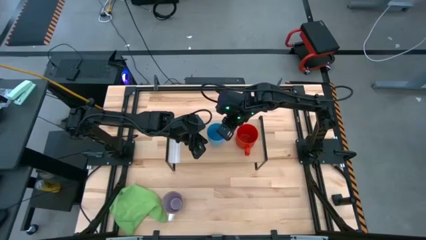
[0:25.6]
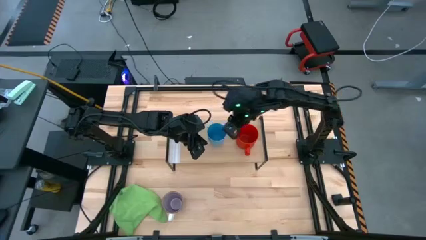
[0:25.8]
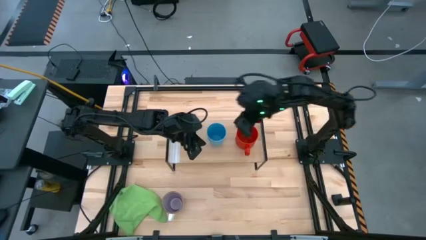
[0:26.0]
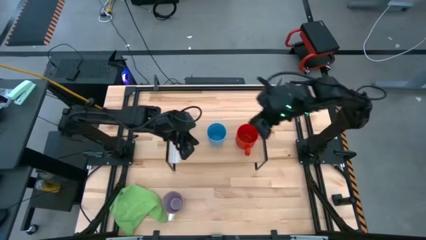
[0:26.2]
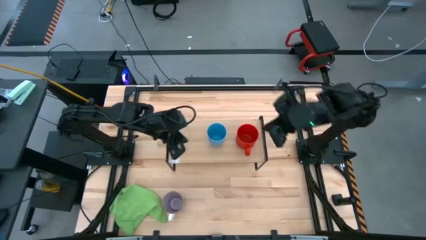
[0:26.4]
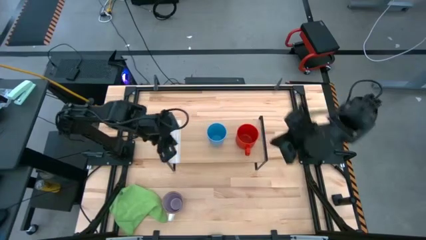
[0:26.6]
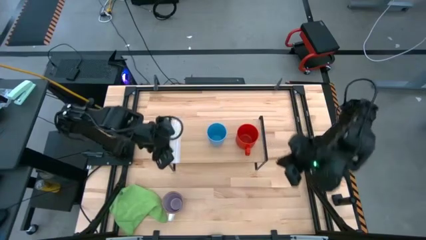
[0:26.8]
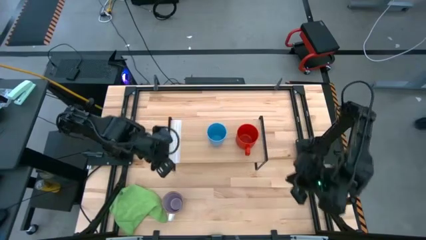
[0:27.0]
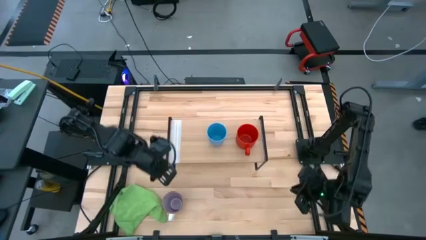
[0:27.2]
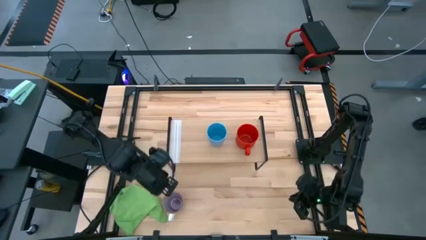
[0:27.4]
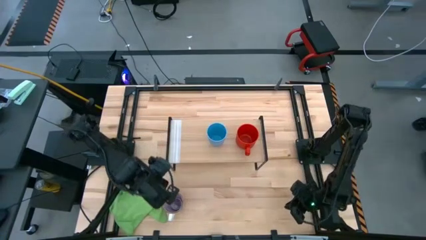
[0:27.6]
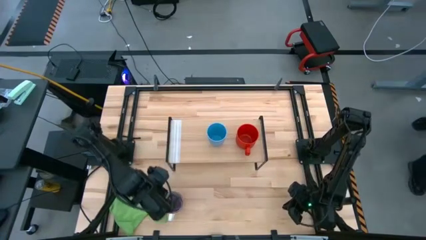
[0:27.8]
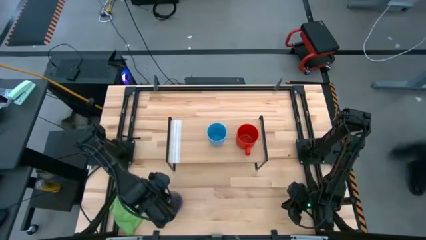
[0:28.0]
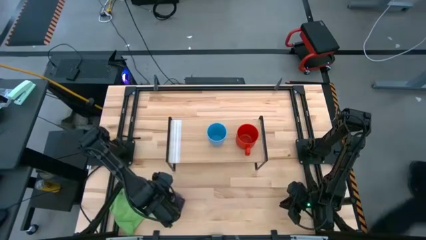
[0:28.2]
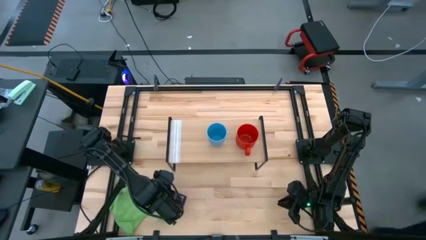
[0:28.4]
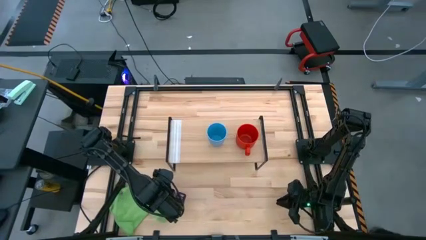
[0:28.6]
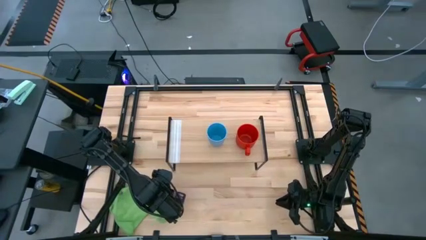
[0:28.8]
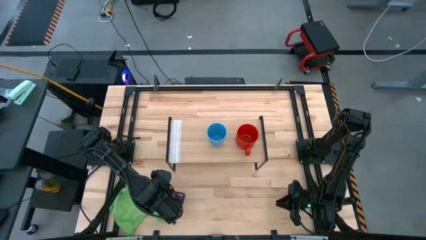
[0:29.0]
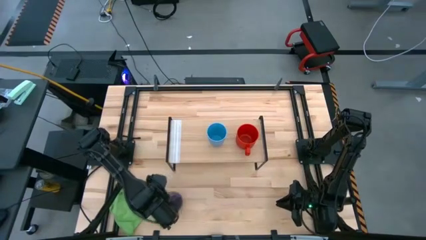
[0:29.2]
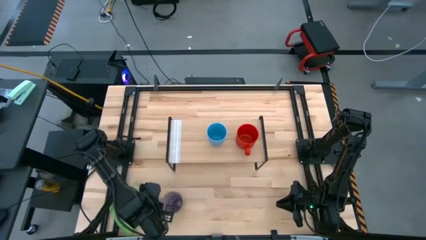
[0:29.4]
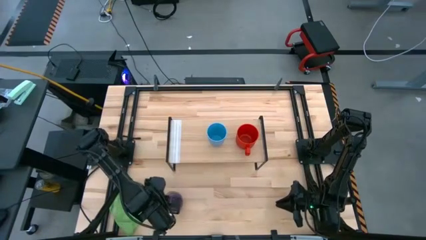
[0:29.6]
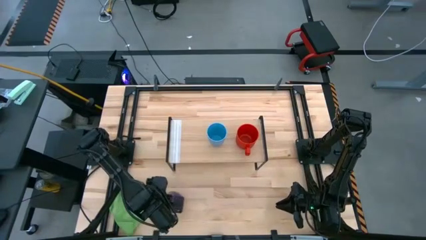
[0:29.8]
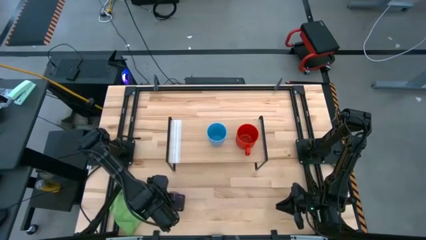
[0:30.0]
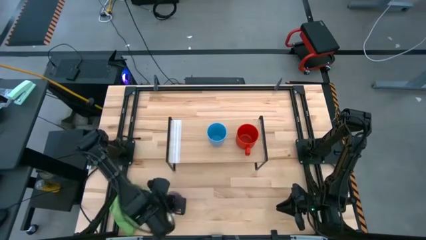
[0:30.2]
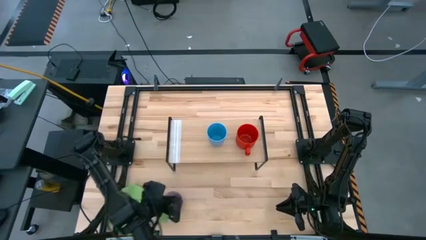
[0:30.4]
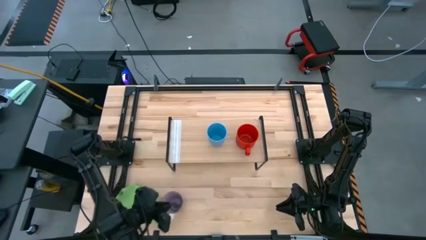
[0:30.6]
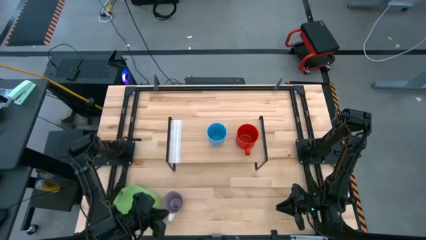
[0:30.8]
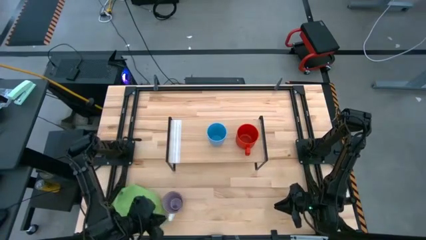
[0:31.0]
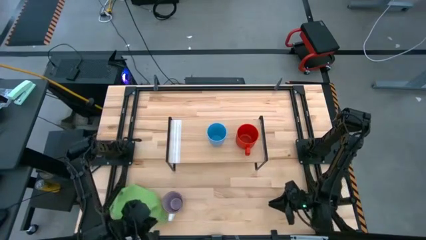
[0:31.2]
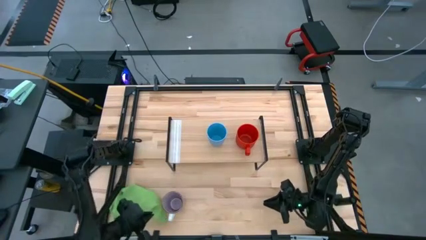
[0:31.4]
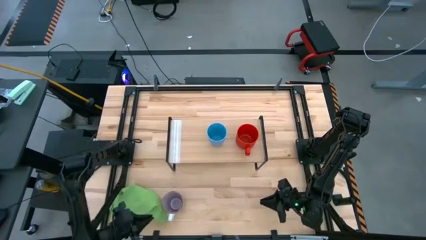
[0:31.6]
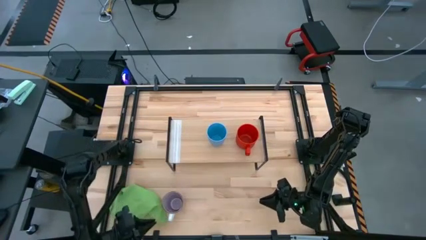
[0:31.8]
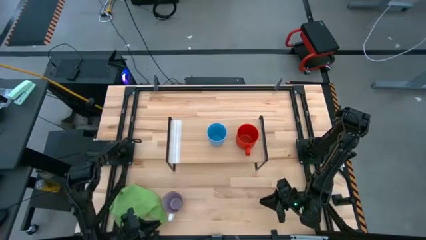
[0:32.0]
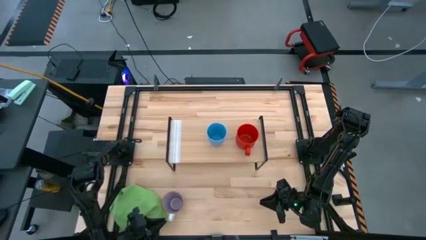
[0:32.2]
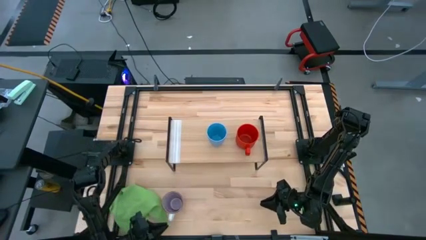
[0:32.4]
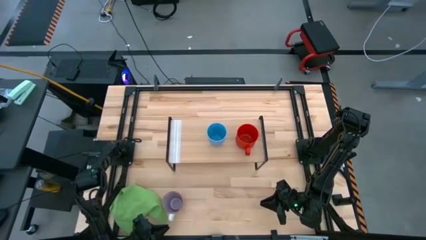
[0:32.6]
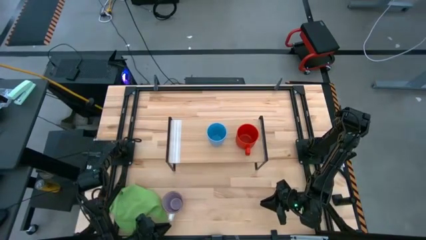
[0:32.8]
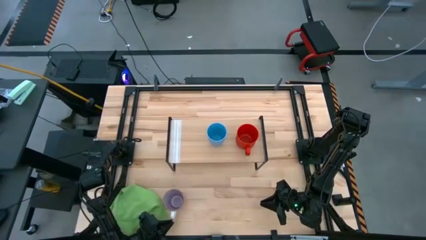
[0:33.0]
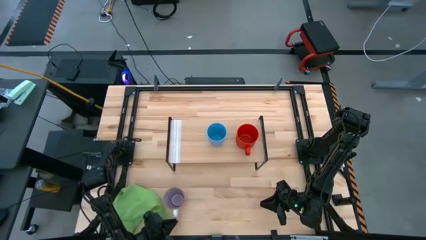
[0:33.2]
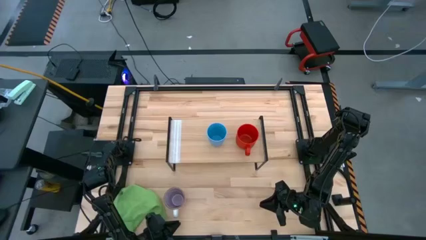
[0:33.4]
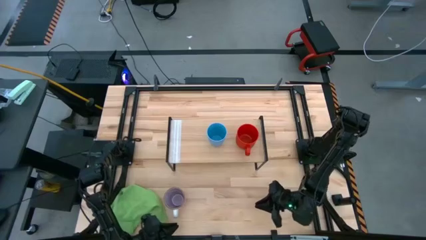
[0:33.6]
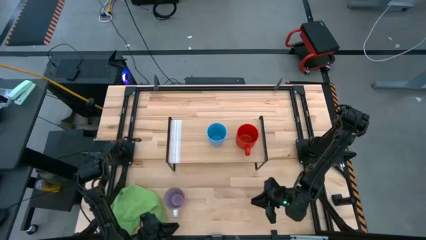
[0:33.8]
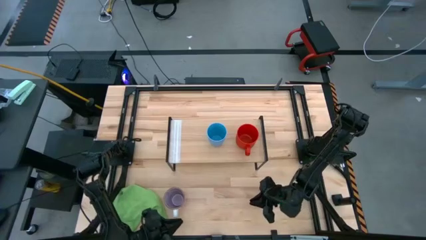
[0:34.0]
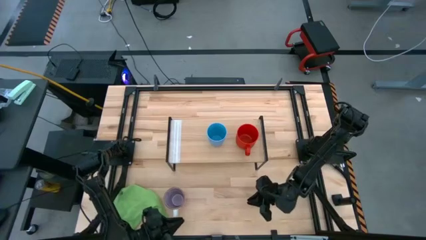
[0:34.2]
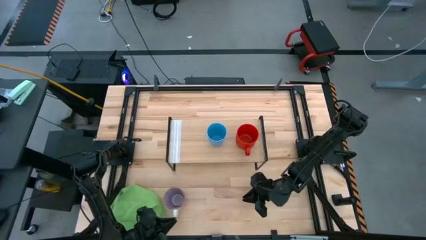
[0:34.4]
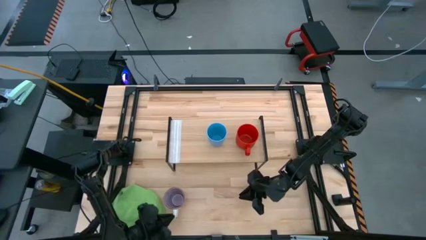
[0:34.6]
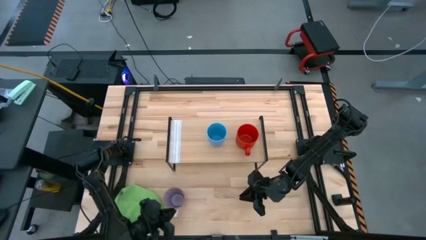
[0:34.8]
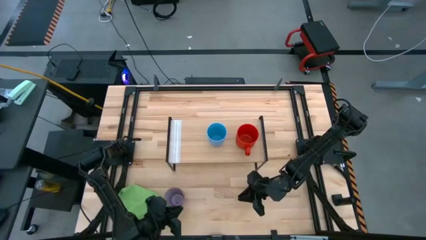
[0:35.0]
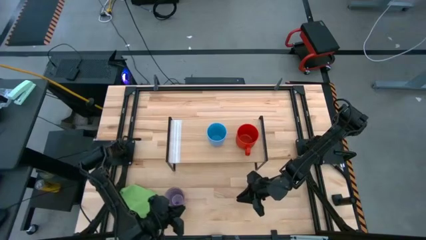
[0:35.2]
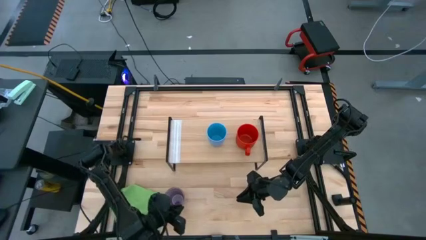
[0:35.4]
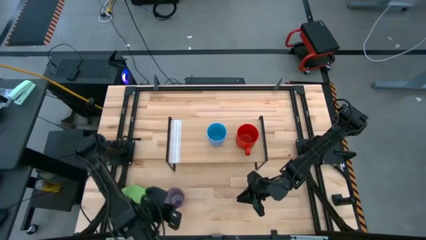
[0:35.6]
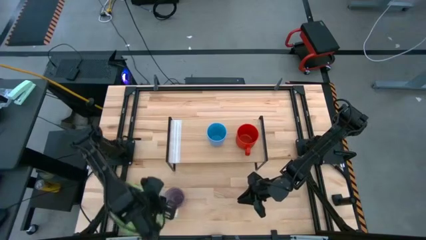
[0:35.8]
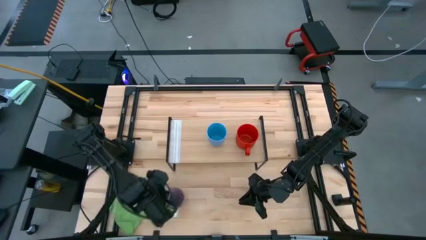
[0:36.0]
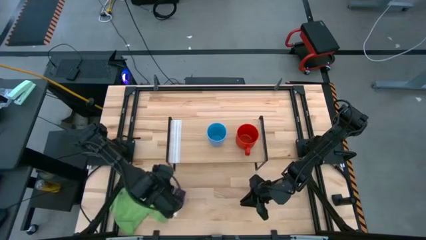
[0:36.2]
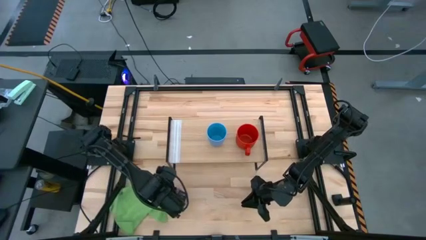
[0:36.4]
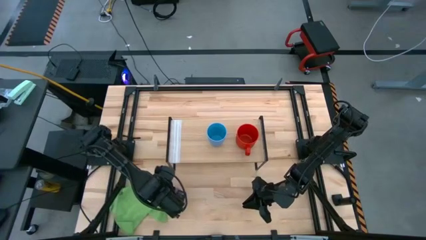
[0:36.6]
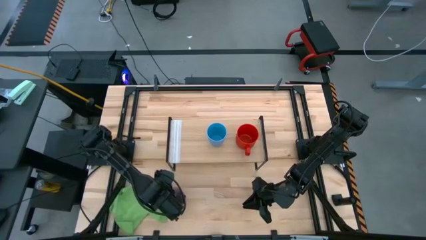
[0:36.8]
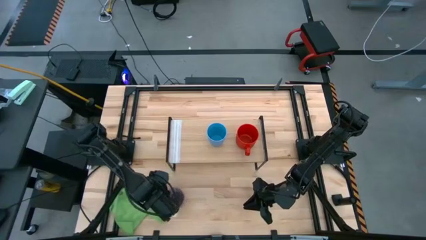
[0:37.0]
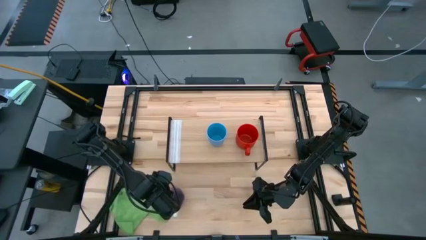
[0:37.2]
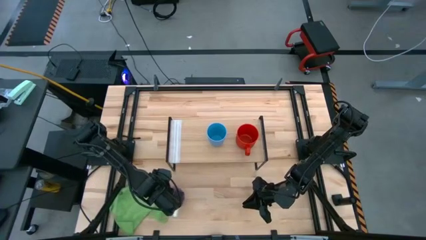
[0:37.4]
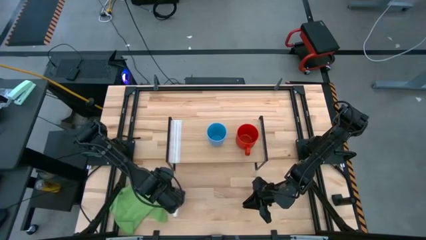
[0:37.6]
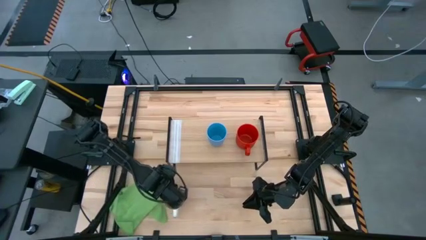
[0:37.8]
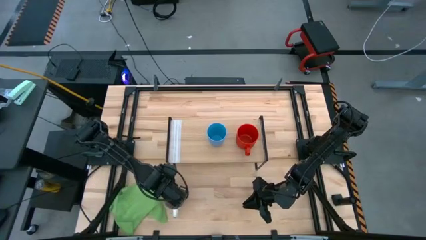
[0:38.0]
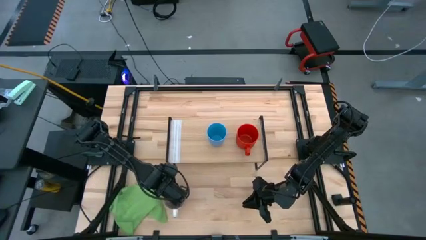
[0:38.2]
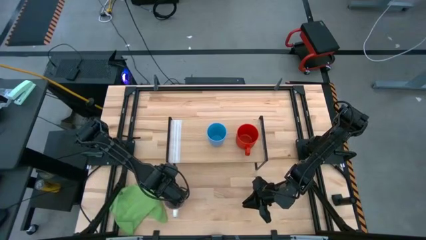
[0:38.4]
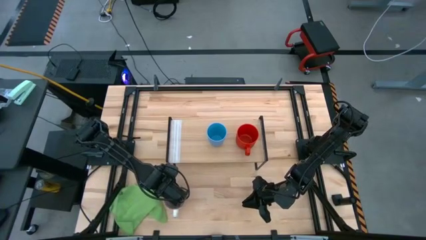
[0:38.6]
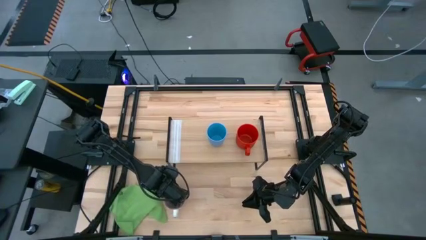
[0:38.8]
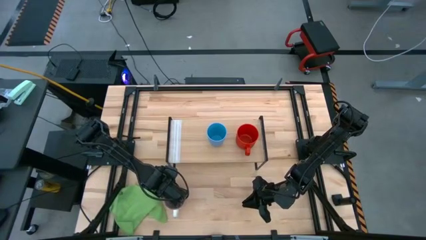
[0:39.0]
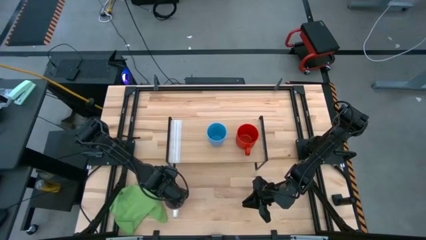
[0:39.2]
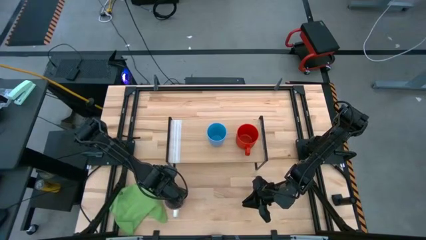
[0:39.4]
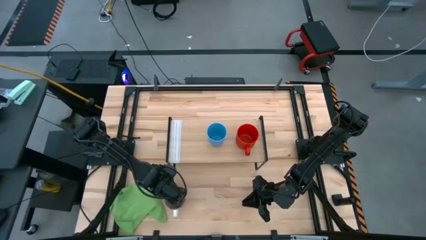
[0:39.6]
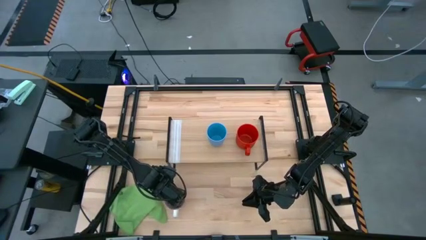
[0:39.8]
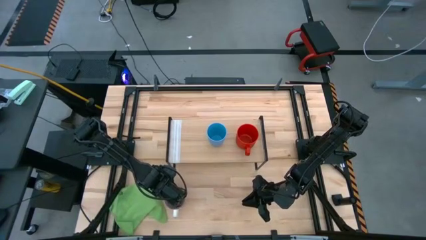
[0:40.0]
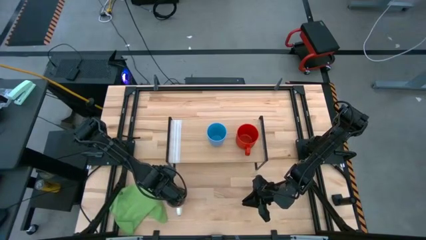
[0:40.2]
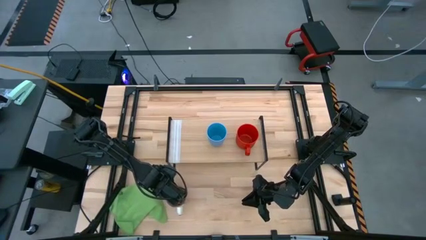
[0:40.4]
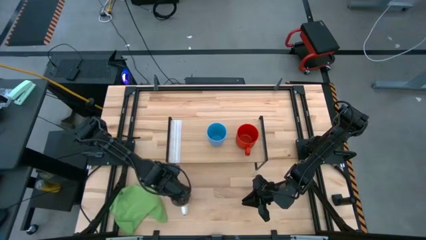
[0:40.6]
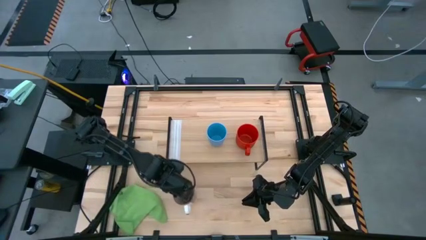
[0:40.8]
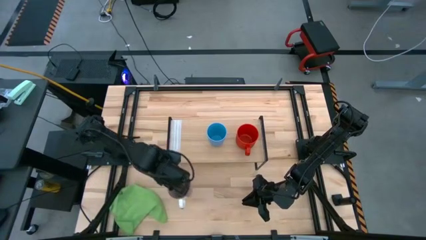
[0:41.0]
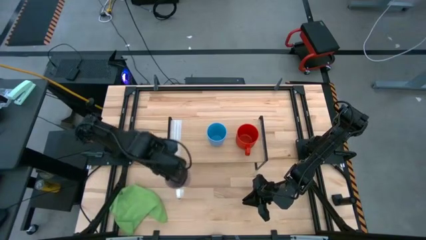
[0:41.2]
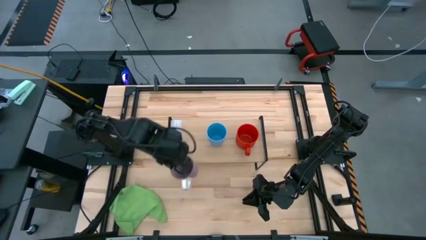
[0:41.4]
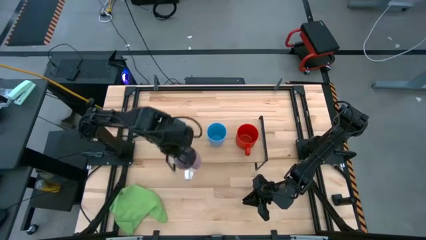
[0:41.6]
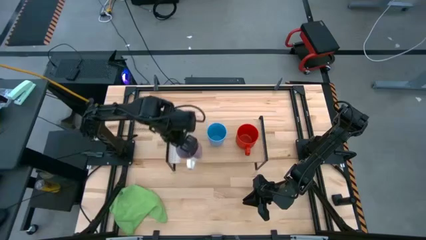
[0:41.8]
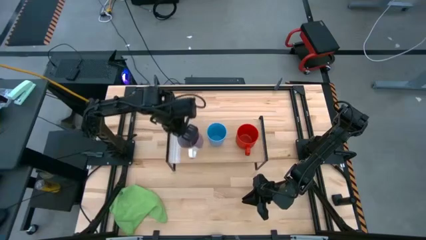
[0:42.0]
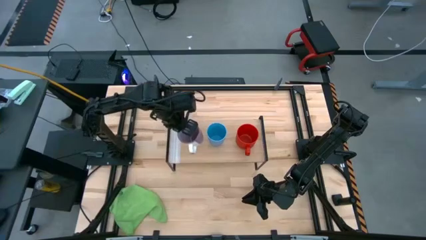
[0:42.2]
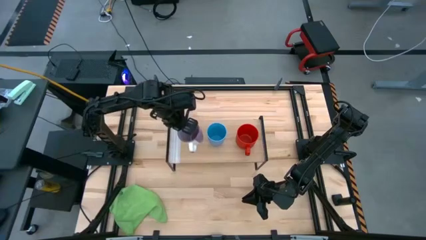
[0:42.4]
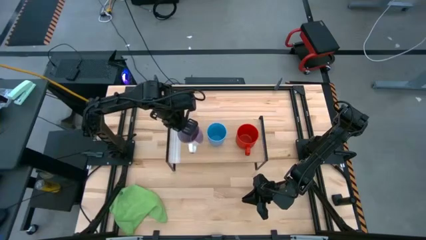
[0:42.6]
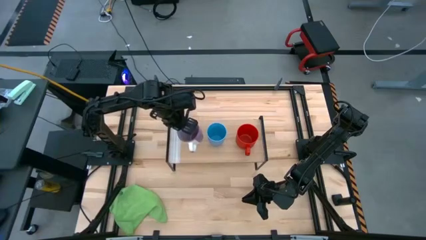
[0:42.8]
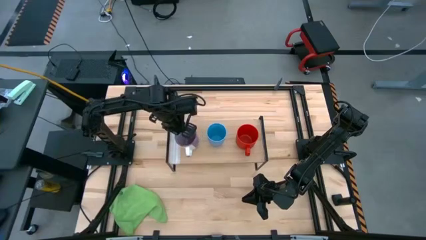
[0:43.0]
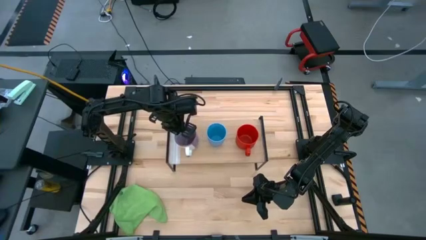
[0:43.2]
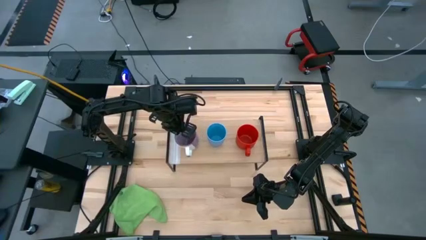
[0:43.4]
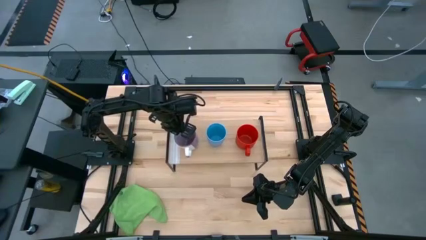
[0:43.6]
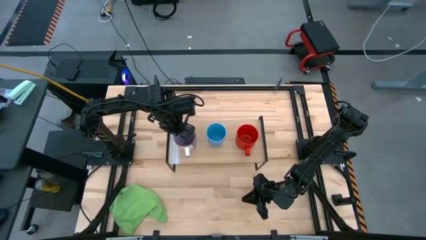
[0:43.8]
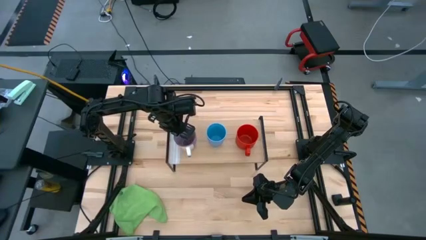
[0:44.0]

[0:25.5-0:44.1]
Task: Stack small to large cups/mugs on shelf
Put the purple mug on the shelf
